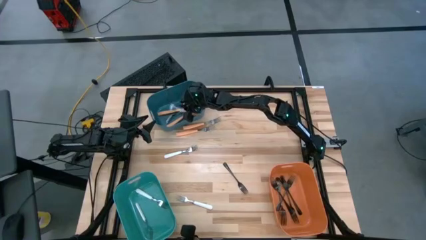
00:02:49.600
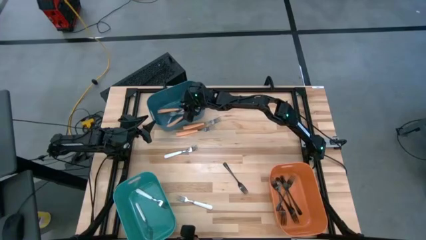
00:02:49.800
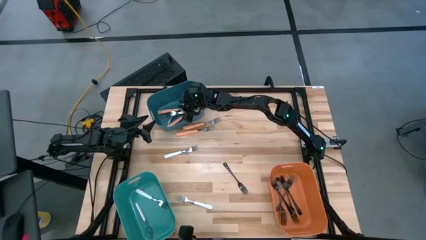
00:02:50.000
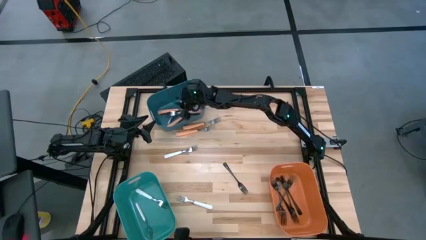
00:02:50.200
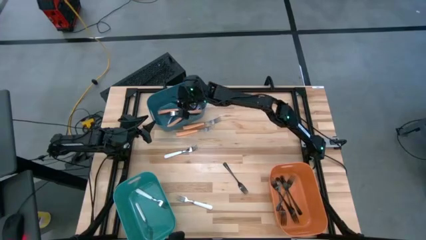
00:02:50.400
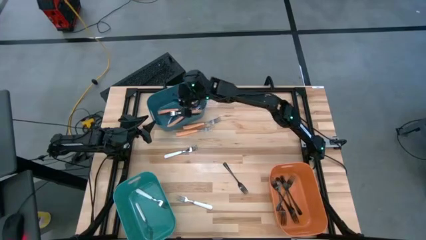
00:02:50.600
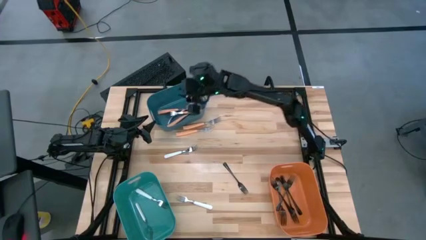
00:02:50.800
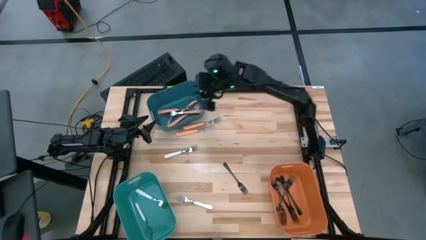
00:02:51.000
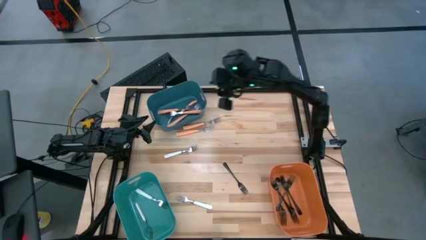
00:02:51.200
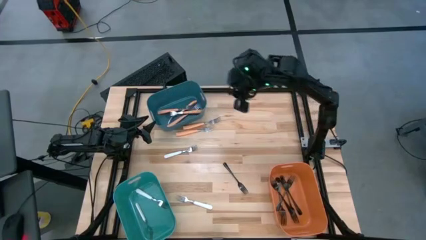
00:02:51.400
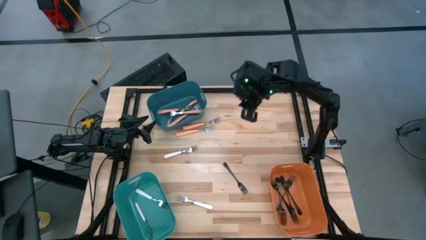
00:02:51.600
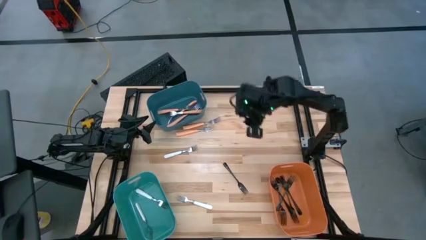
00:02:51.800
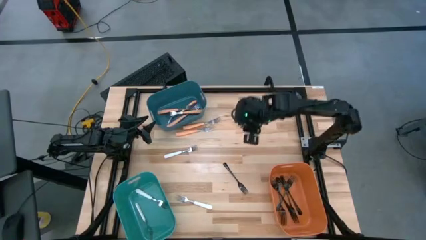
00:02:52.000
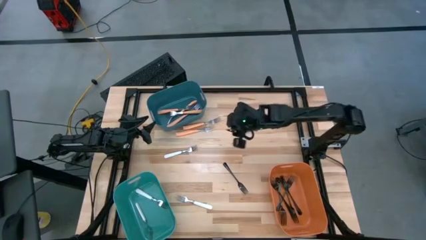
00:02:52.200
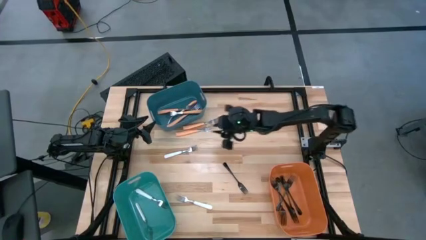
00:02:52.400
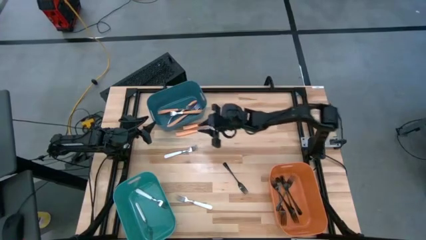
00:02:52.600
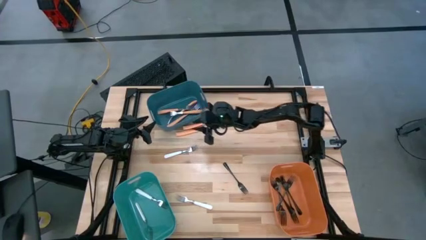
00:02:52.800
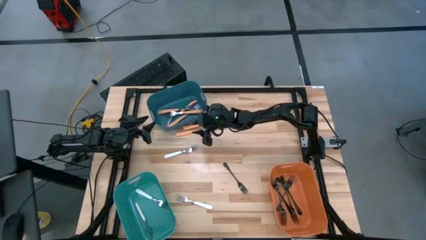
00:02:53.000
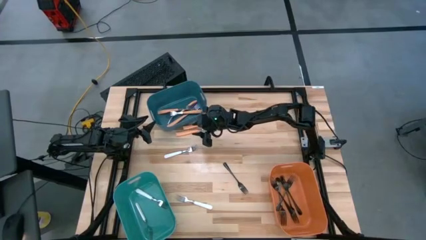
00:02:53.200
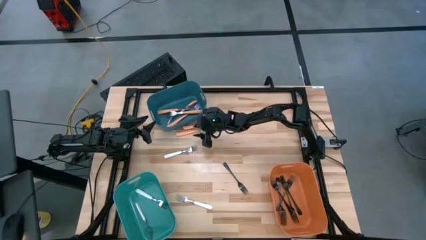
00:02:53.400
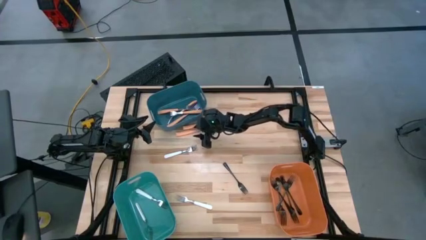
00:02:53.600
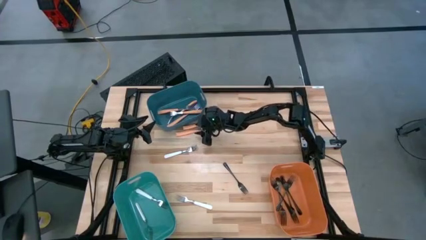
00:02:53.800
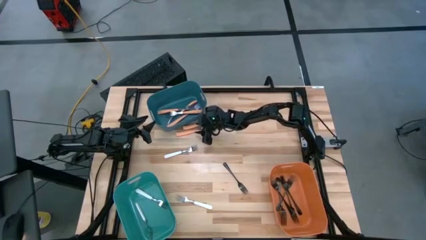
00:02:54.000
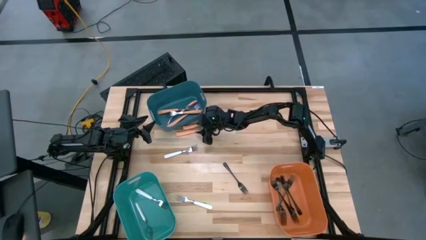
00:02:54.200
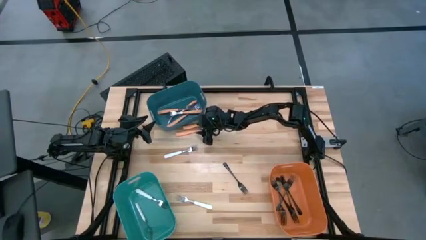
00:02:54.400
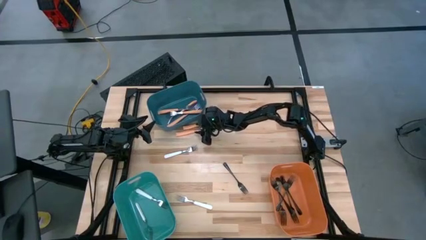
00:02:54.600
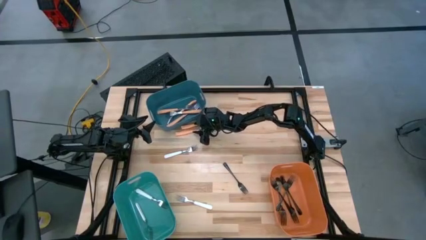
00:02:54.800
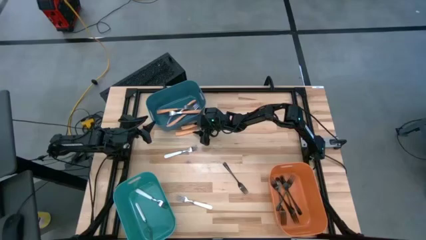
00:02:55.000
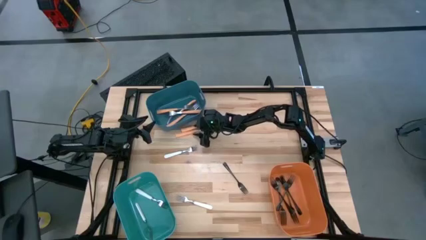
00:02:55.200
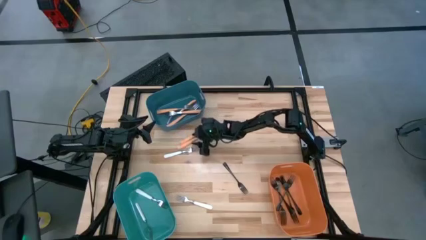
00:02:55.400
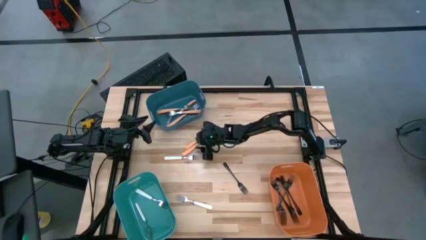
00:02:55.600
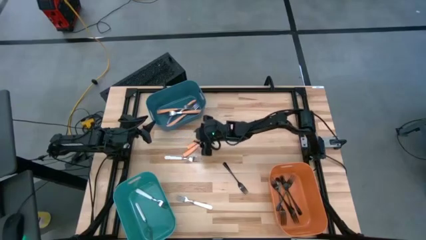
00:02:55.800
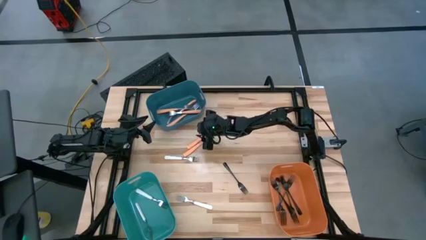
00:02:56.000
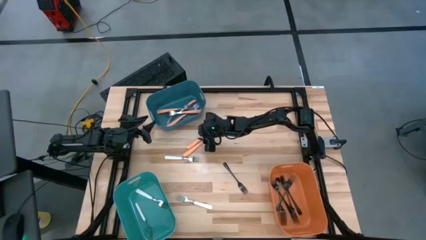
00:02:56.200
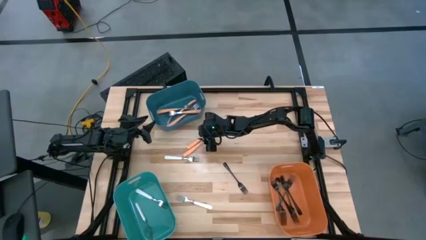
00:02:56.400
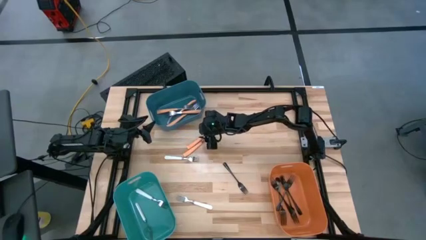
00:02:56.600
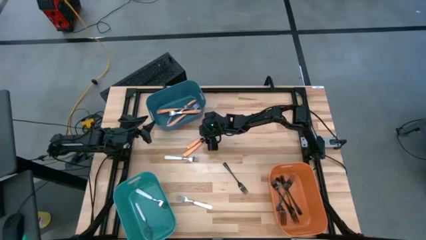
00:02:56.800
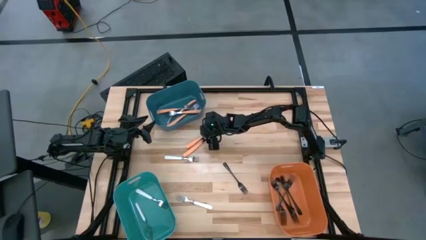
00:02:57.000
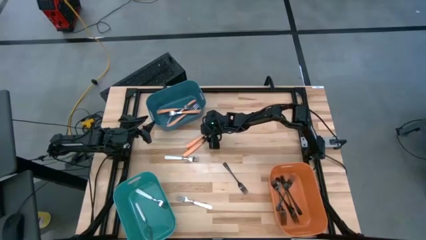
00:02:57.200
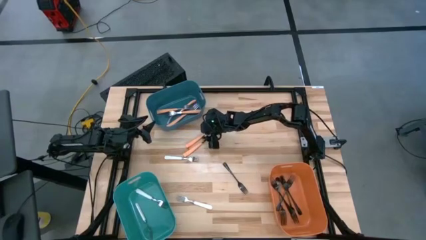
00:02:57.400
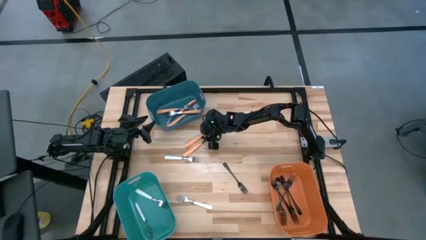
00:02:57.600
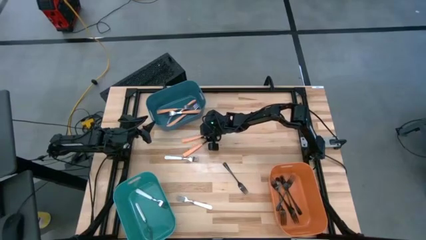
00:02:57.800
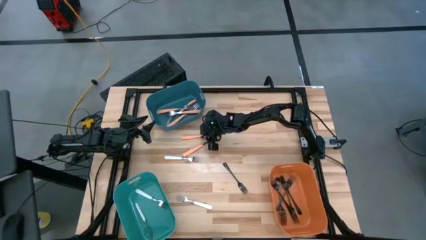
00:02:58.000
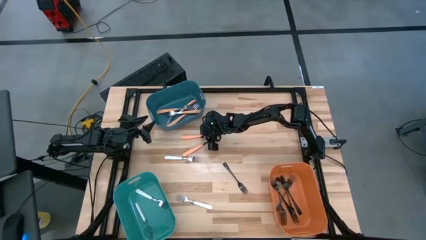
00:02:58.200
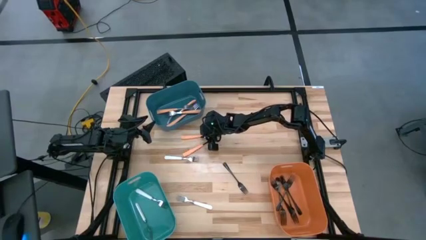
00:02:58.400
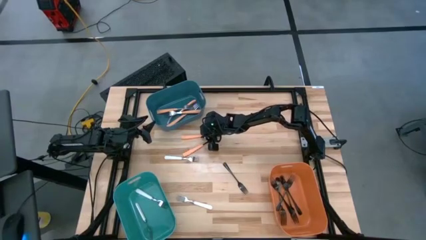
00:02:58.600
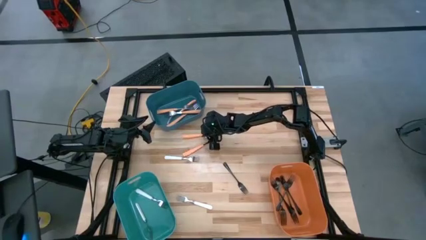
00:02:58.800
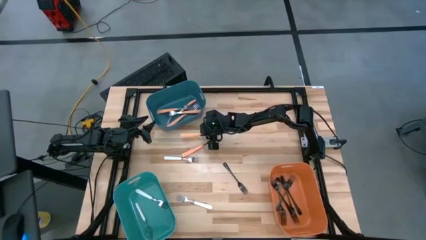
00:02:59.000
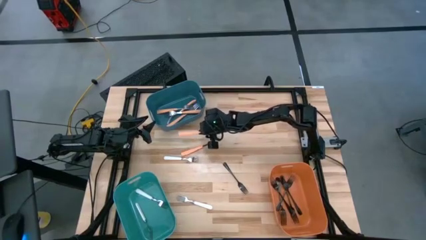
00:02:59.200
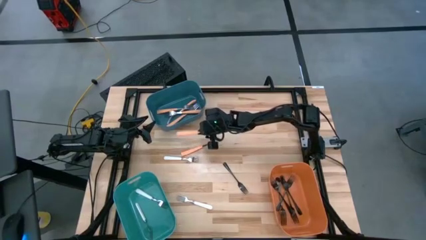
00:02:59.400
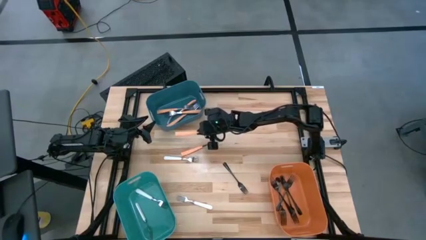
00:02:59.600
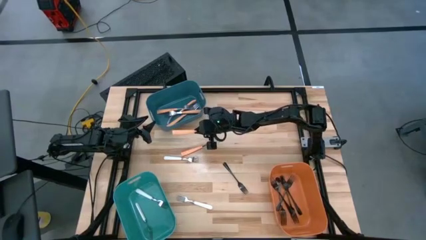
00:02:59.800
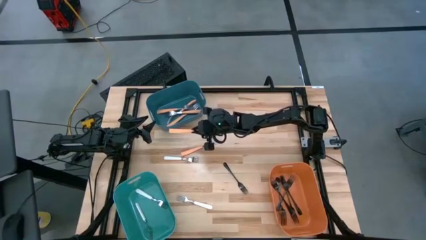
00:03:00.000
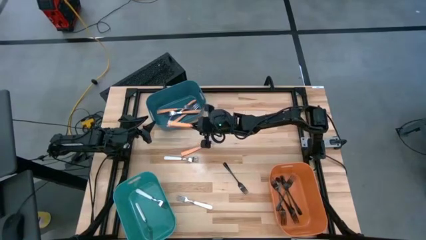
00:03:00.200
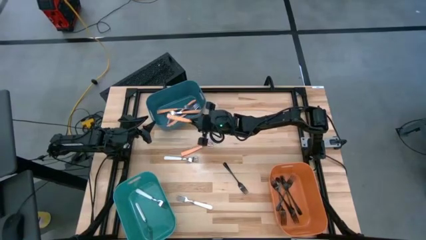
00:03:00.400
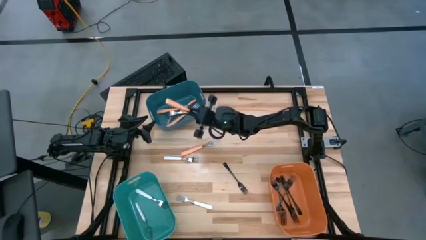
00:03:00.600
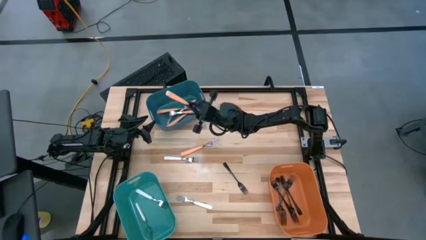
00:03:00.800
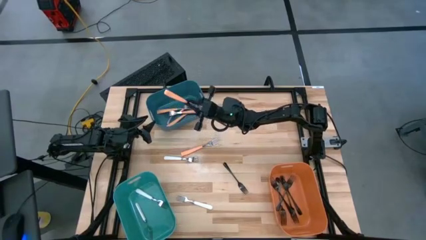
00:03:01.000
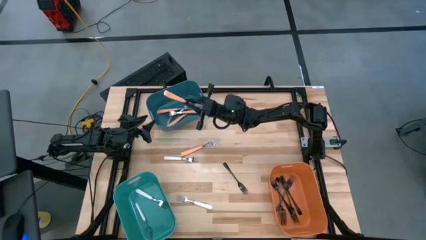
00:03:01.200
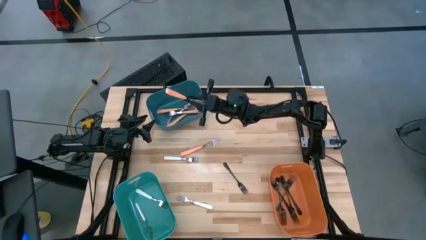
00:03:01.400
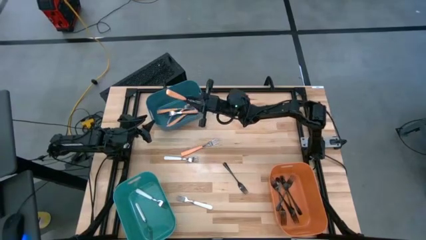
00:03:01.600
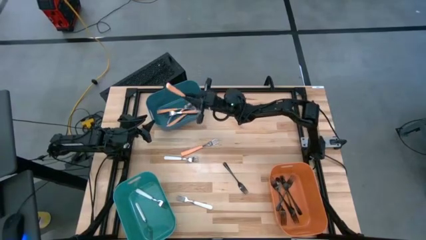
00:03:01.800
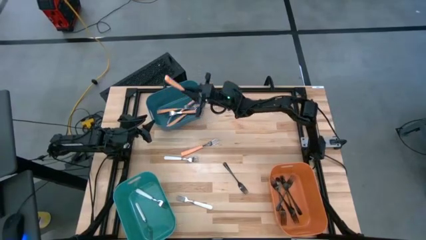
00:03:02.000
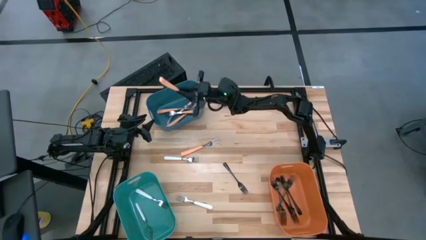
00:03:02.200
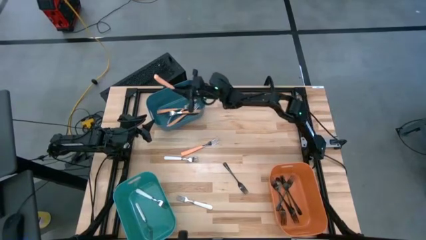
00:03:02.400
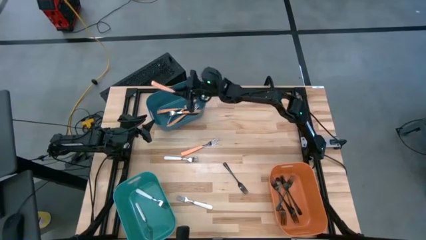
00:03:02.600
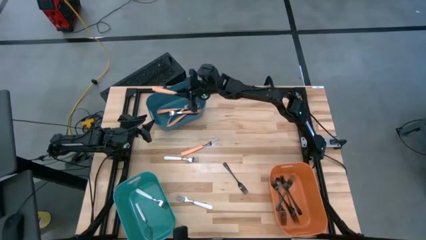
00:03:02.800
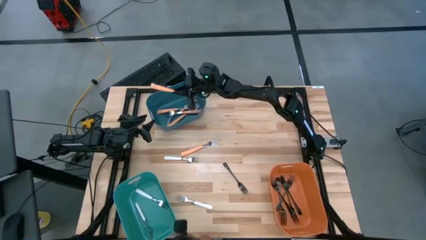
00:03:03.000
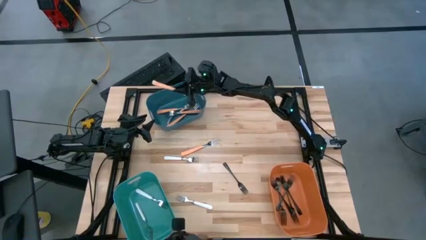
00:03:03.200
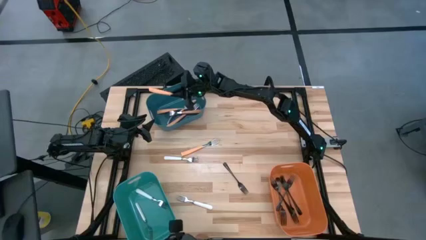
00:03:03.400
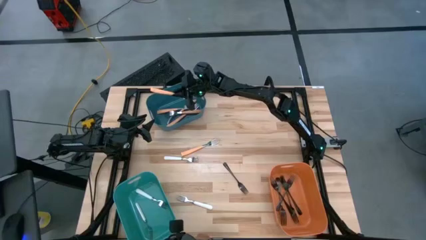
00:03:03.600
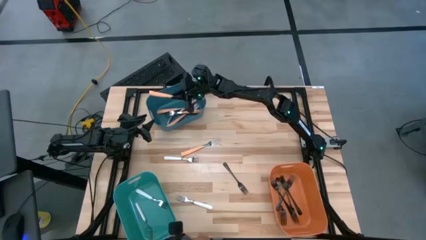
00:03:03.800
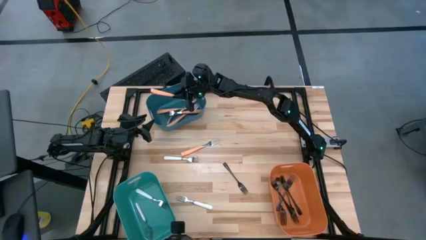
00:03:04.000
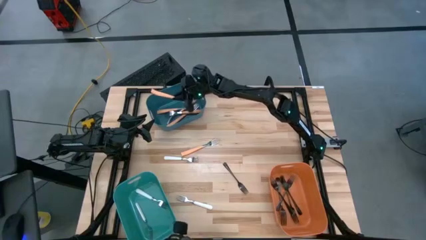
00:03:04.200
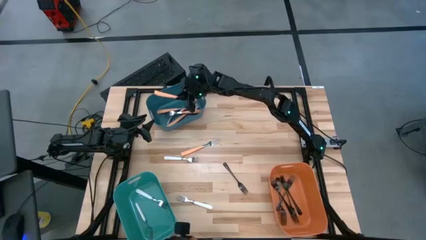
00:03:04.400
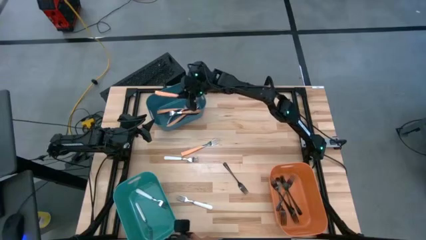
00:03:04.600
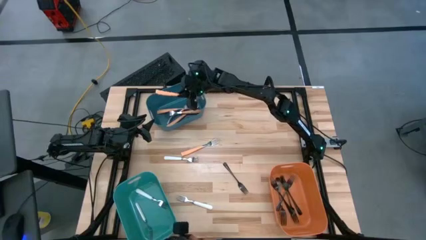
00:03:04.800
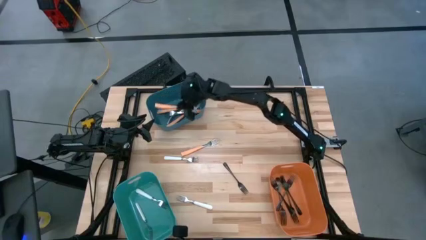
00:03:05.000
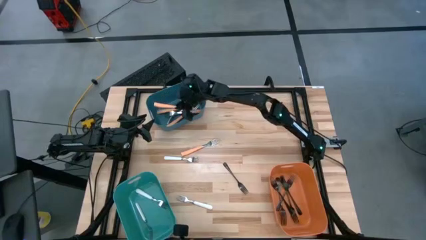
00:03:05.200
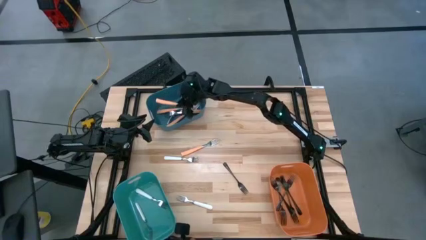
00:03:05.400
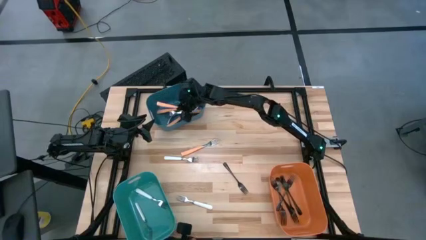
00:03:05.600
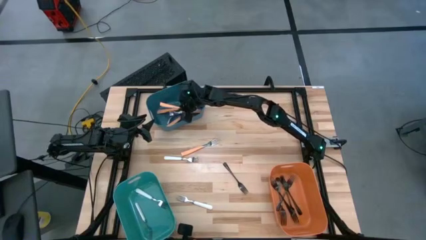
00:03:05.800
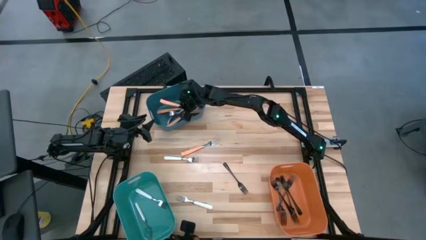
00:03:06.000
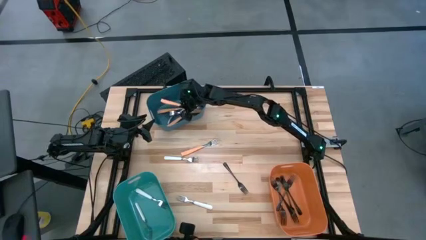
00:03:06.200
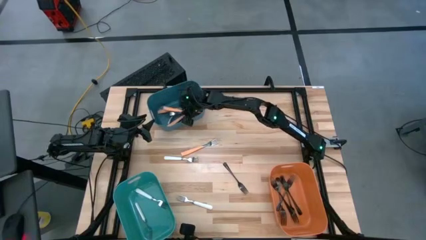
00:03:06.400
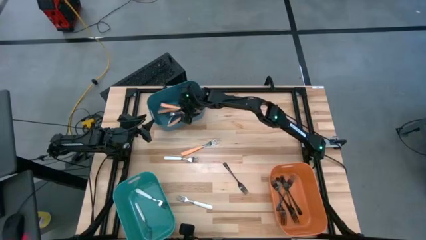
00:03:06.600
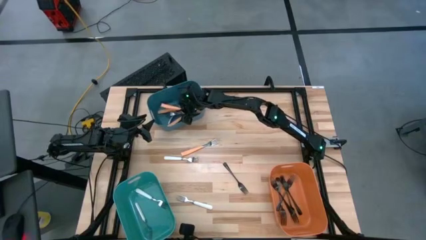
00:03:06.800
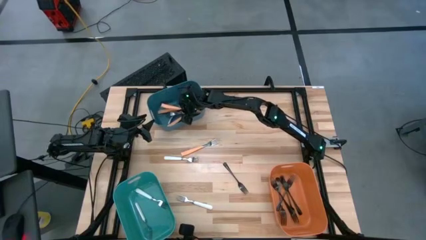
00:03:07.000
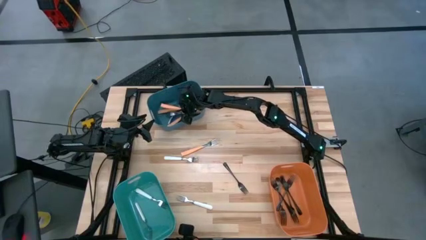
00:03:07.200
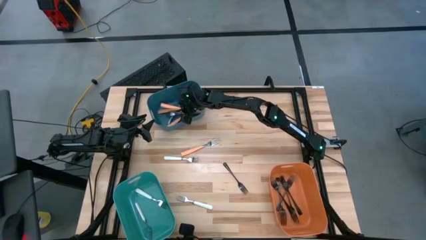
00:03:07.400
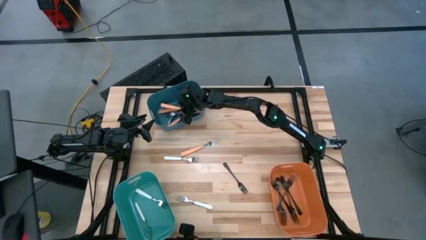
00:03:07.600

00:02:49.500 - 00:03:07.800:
Task: Sort silverware by color (type)
Put the orange fork into the blue bin
